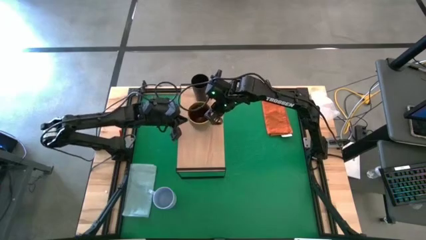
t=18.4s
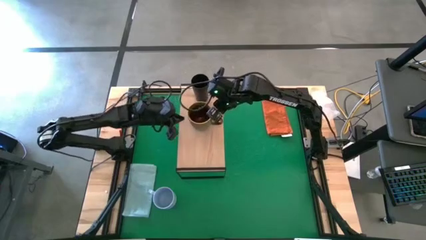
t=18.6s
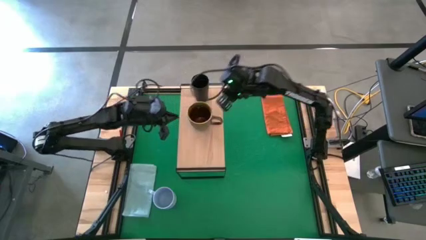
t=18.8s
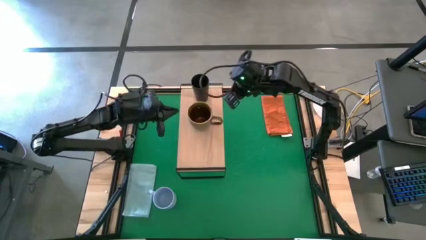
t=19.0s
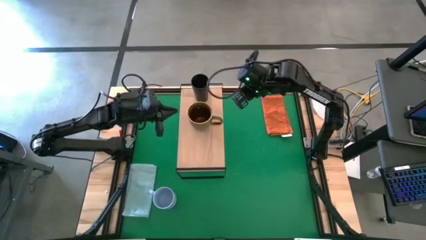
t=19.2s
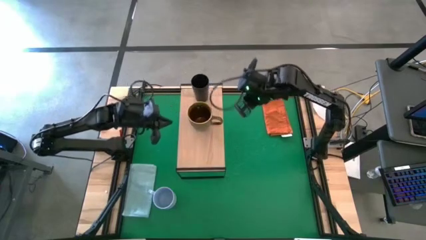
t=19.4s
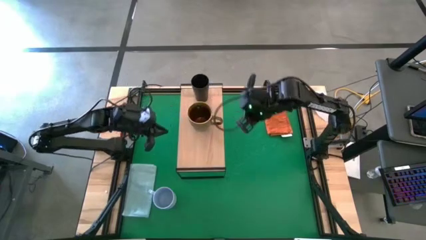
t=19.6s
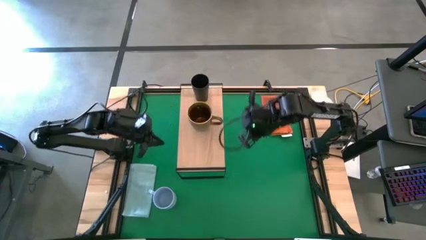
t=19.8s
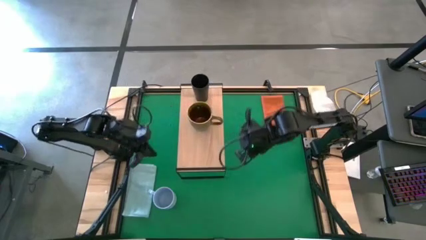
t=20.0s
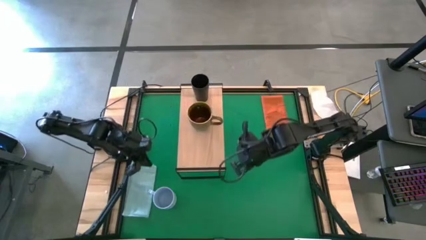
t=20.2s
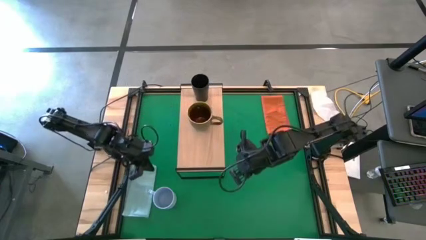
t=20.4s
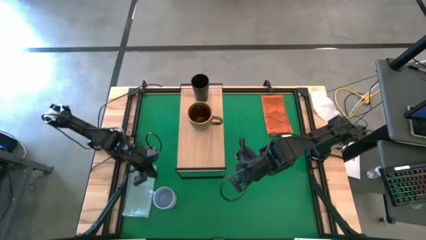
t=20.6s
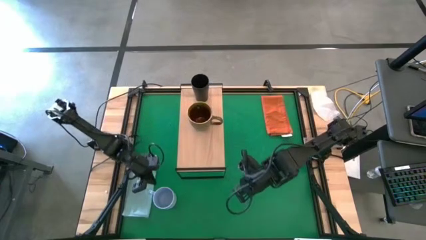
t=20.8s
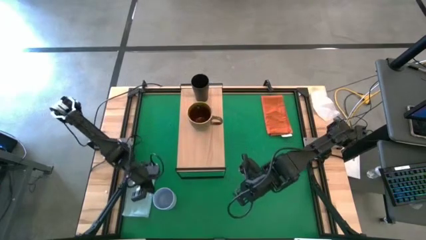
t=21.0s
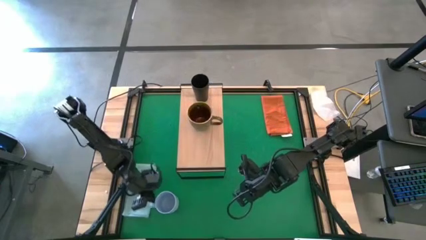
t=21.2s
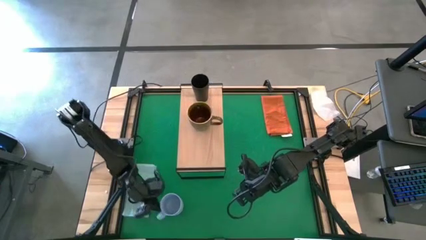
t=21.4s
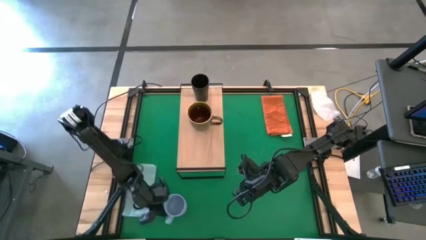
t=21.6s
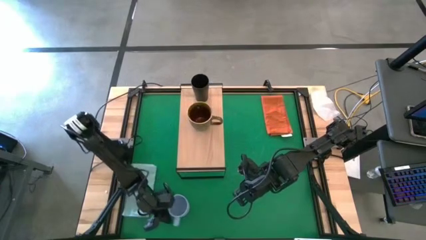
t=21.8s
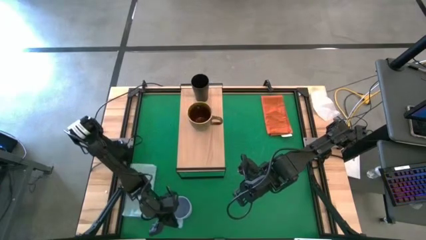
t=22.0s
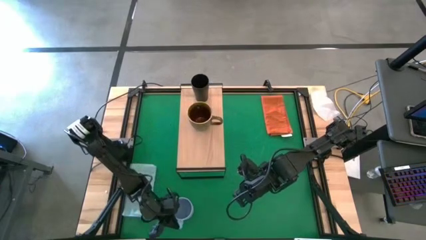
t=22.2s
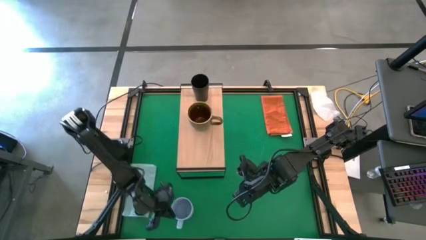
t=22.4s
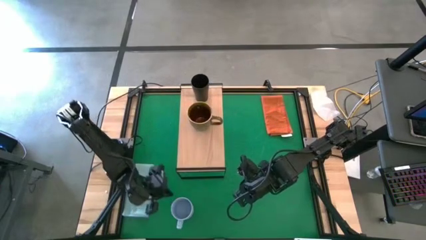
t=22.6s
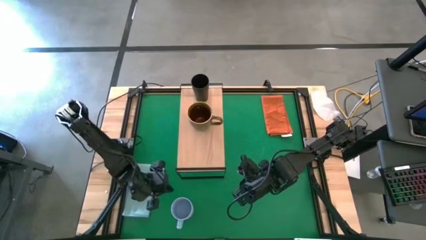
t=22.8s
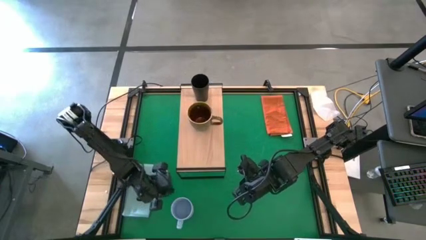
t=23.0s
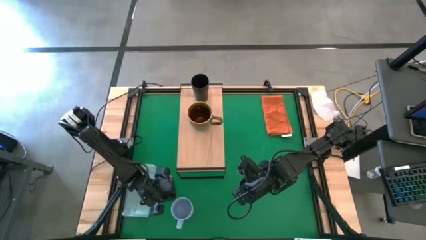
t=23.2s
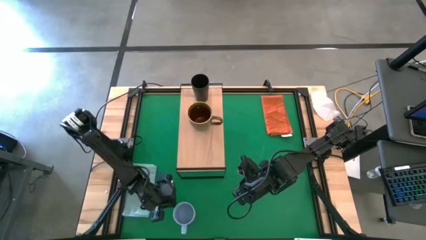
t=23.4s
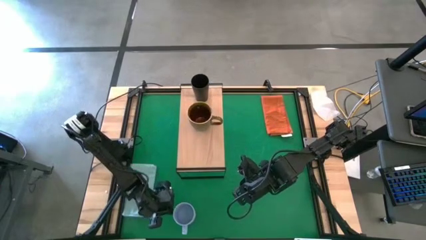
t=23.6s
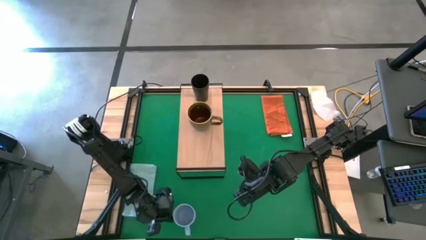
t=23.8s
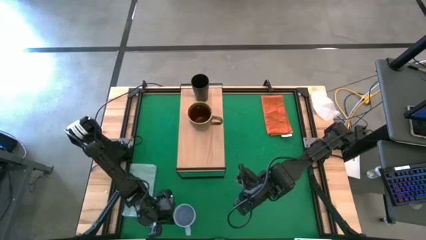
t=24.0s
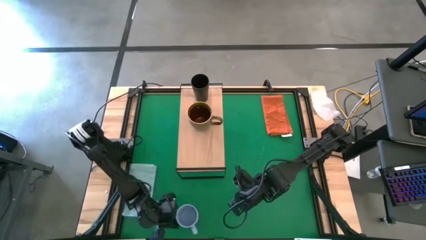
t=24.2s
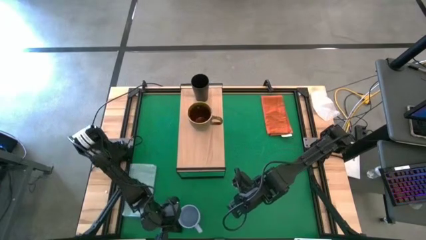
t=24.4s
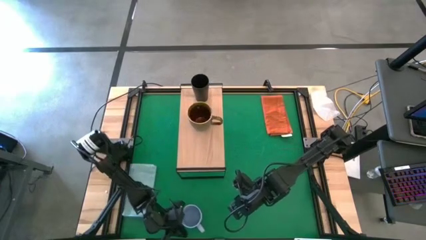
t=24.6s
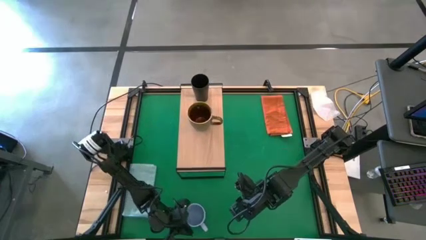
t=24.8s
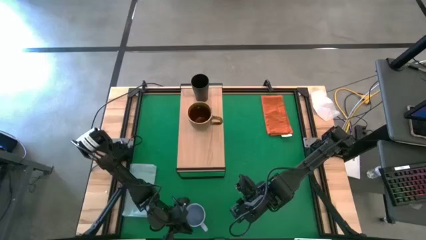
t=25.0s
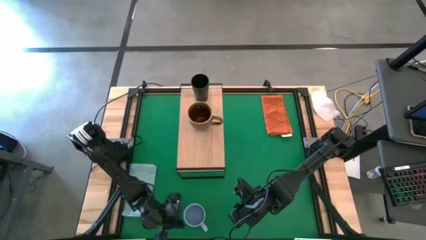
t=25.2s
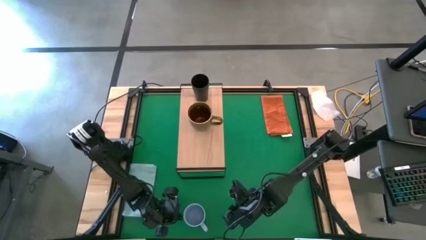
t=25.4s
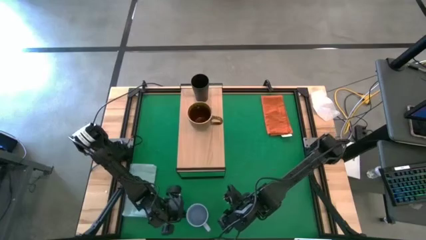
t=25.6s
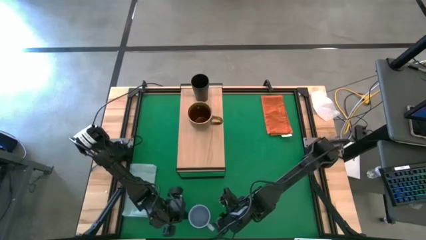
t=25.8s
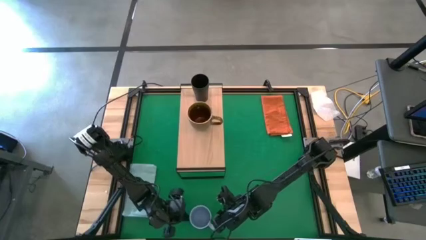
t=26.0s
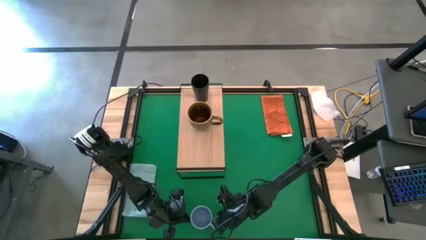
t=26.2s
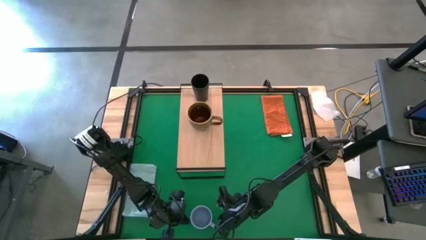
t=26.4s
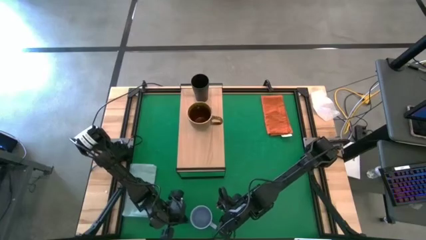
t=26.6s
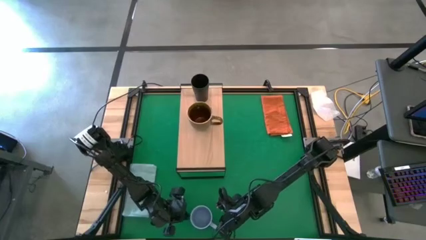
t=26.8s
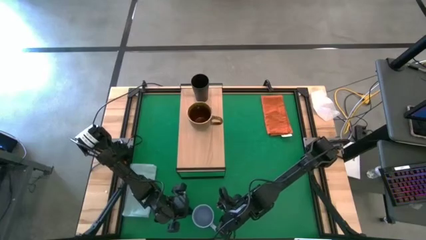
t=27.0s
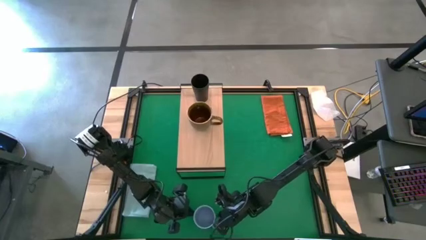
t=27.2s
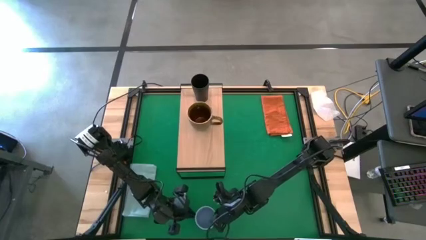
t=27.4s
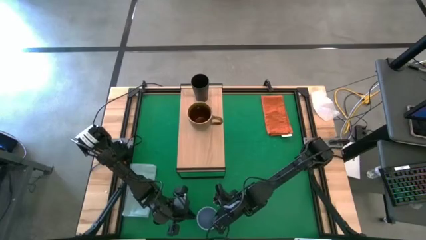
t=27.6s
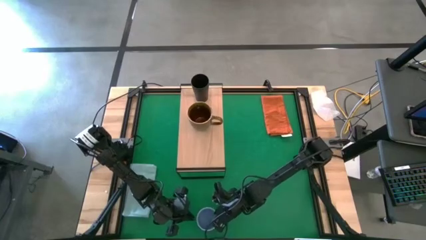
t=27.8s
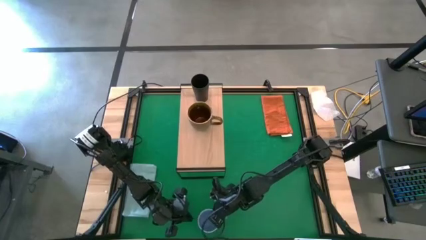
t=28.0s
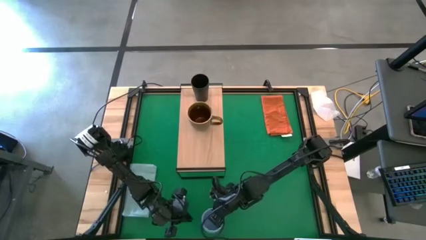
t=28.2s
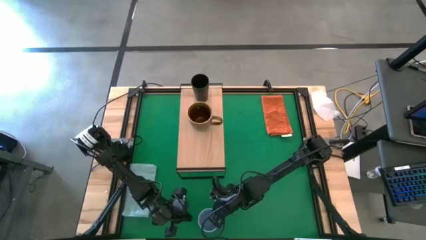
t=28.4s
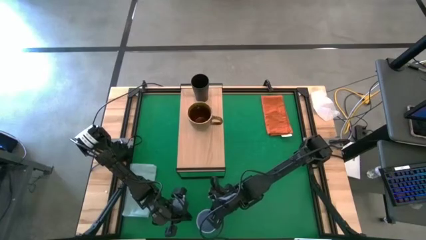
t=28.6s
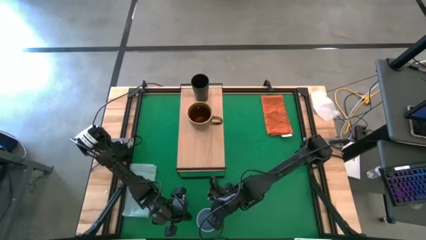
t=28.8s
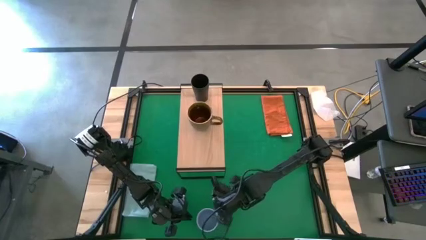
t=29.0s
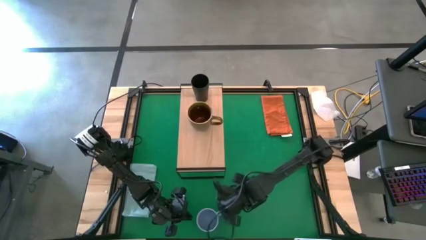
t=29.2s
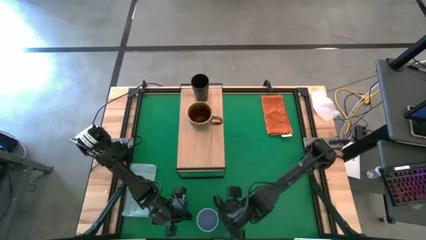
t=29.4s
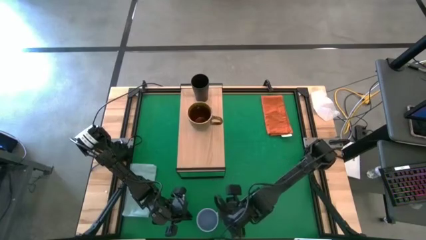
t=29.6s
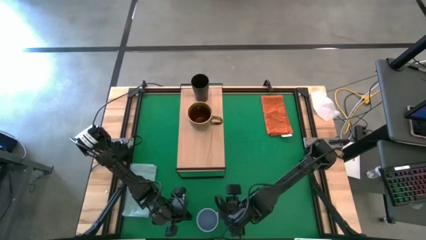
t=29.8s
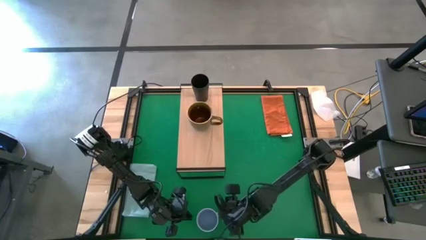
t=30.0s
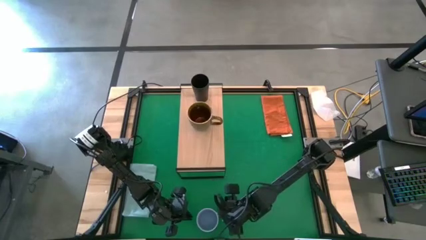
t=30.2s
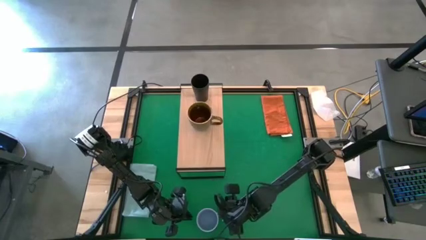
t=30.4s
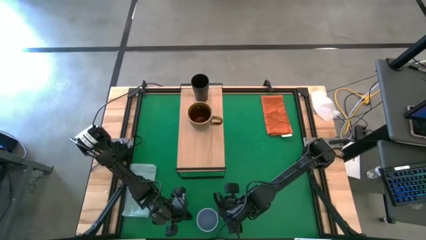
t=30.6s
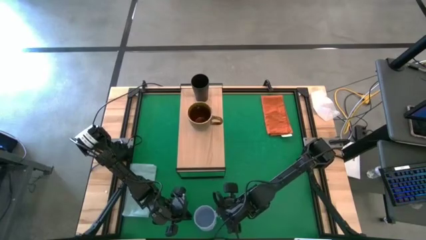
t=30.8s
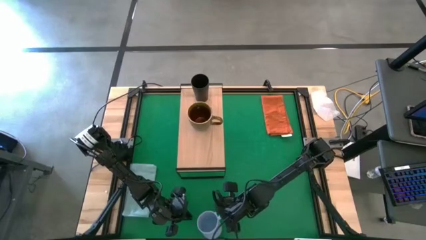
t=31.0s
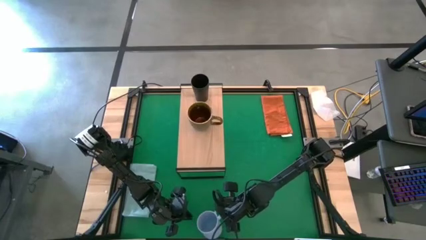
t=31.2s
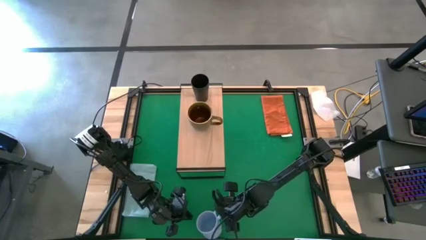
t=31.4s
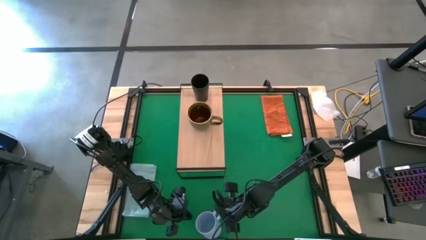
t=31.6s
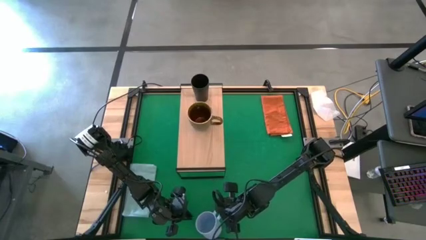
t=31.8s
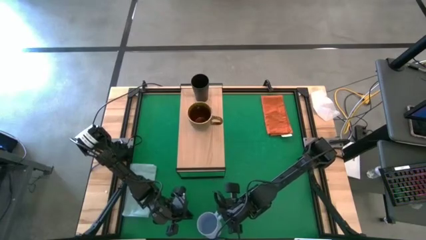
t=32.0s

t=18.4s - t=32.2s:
Task: Stack small to large cups/mugs on shelf
Put the gray mug on the shelf

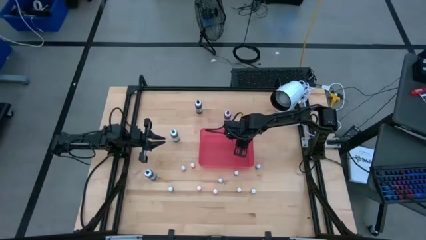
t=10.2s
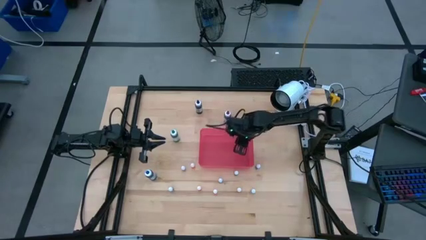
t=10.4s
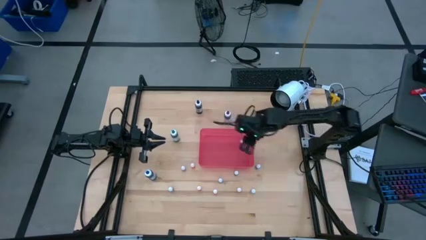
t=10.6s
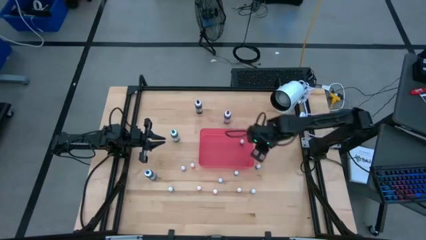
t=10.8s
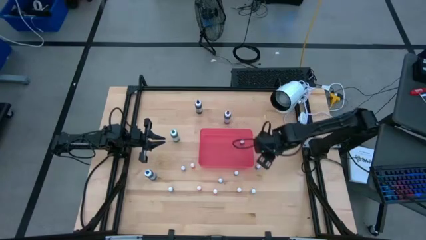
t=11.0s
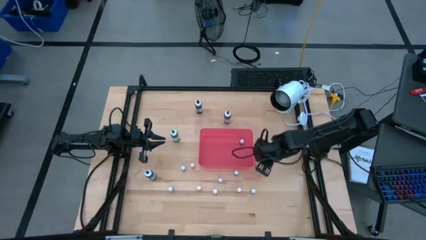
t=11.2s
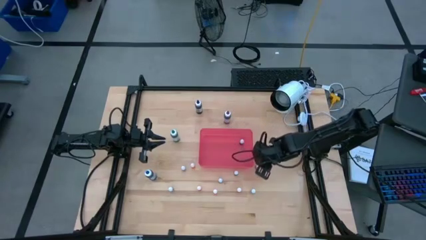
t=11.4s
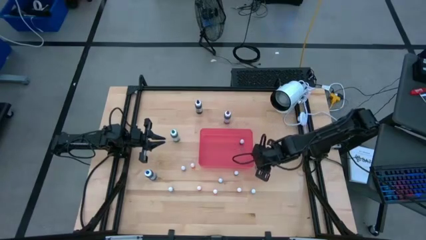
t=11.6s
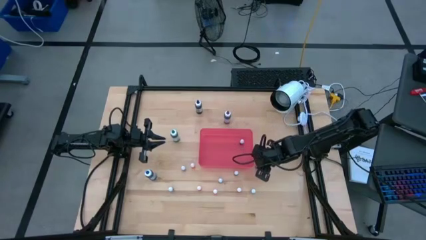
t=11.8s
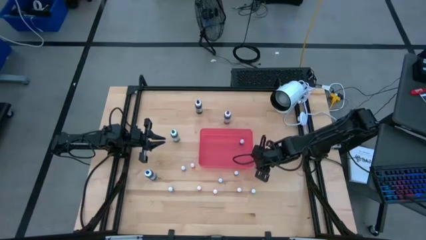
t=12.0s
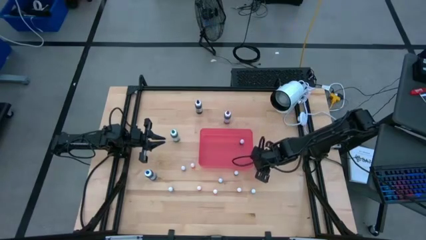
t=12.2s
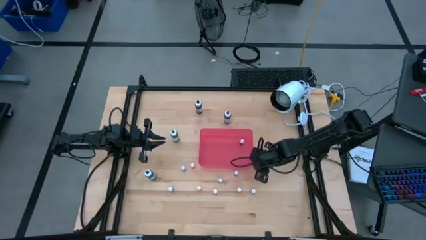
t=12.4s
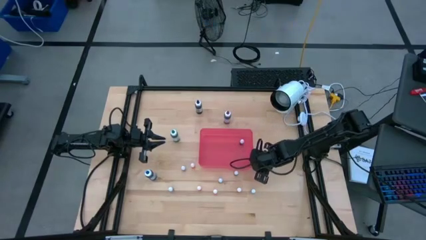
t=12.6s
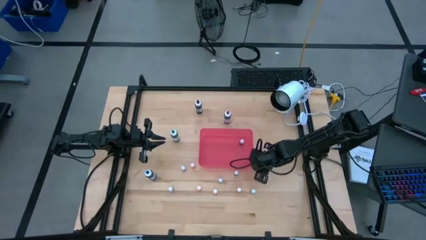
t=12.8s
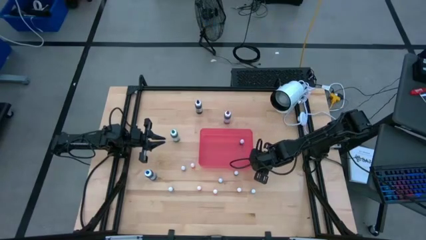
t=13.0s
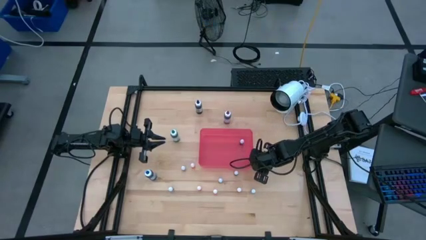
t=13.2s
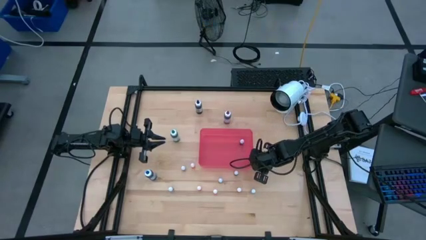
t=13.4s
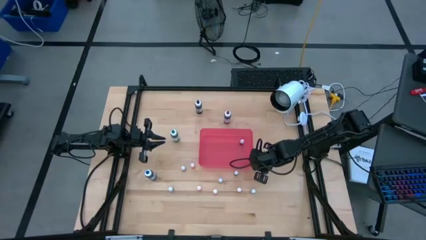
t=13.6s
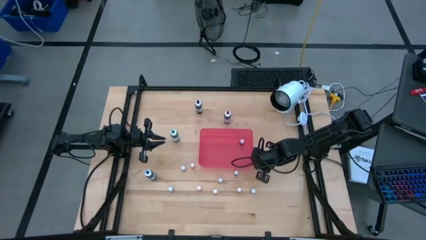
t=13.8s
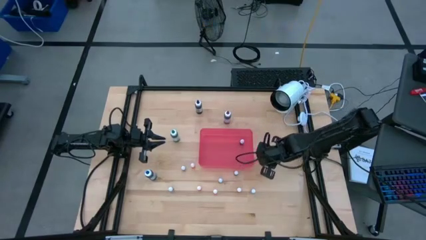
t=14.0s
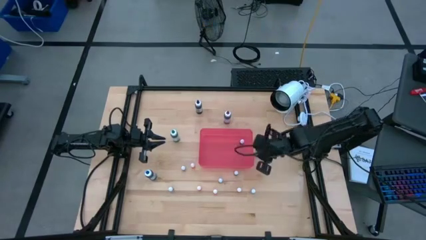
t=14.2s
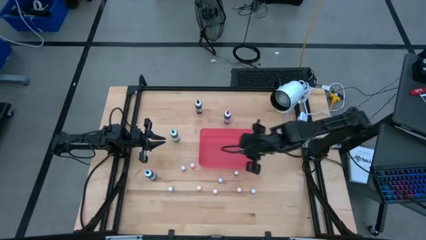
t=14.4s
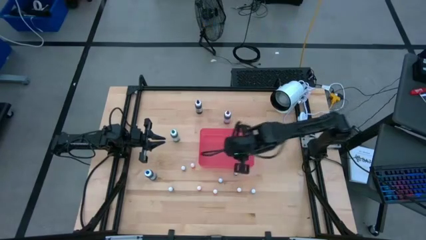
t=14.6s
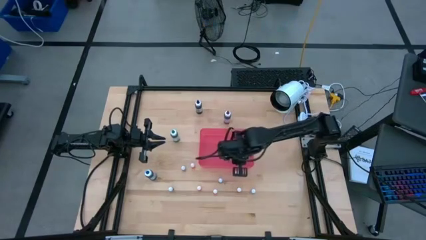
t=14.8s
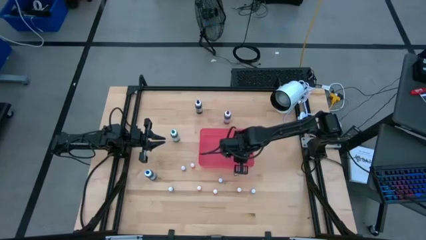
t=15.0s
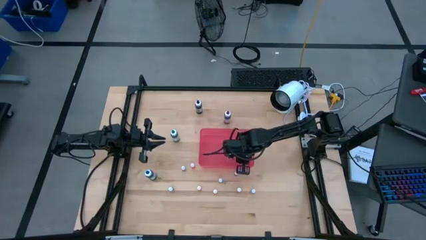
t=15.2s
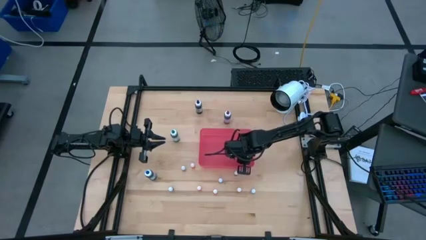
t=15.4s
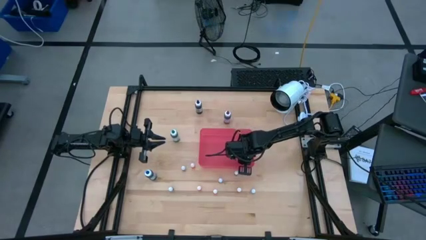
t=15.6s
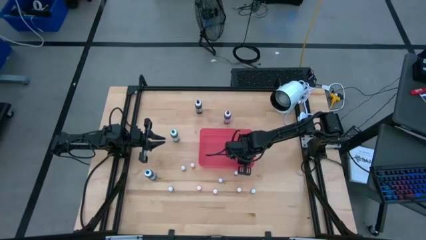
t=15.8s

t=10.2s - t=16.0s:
Task: Pick & Place food coloring
Put the small purple food coloring bottle into the red bin
